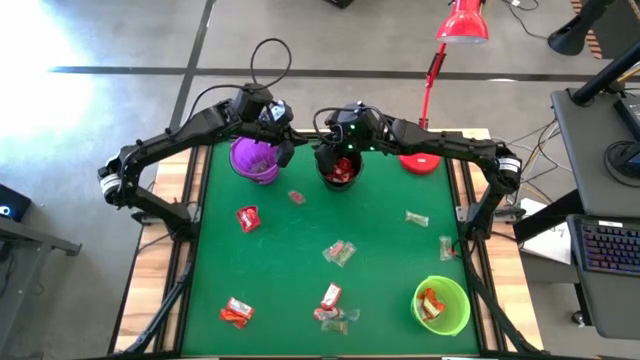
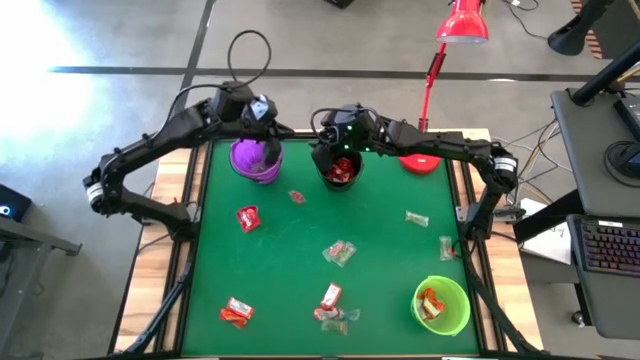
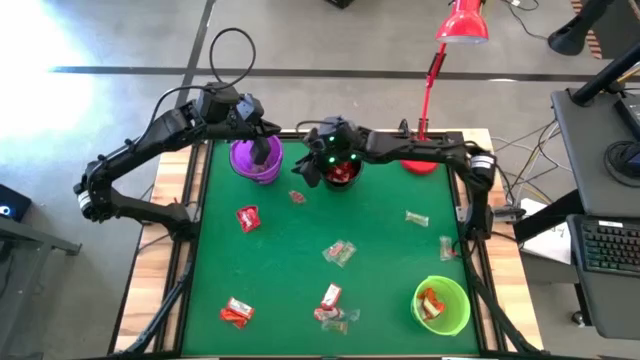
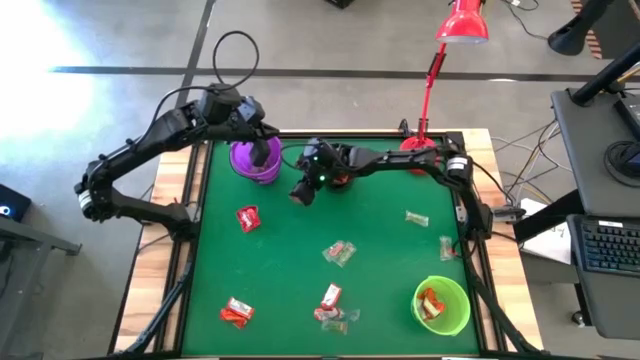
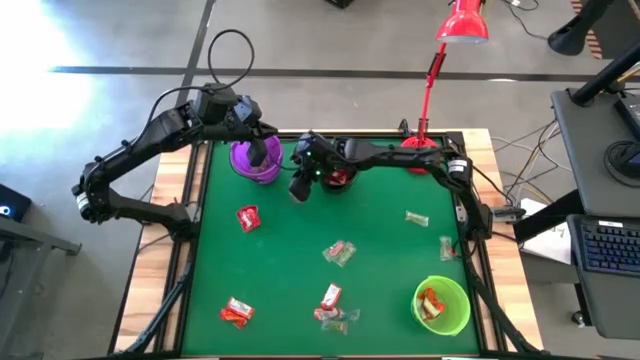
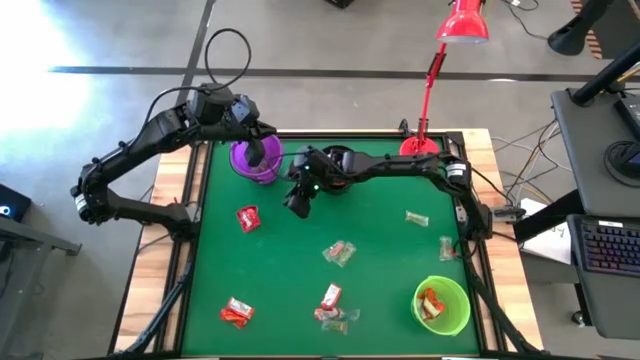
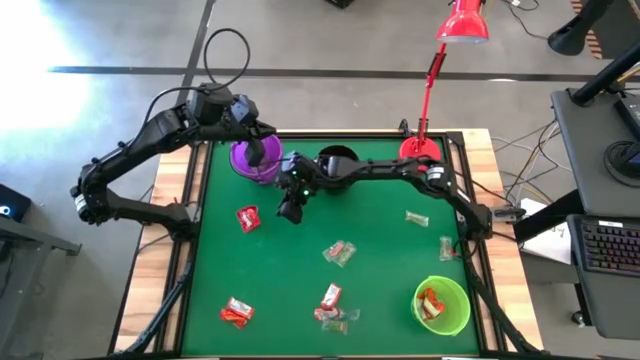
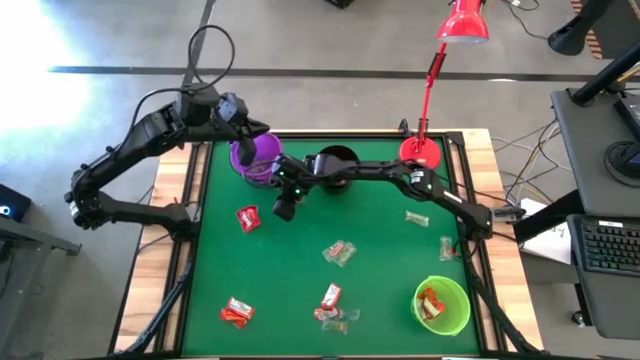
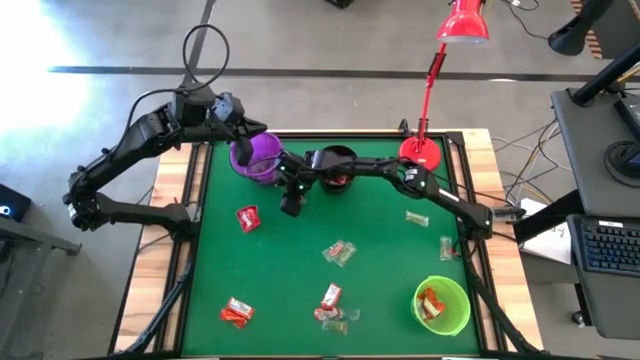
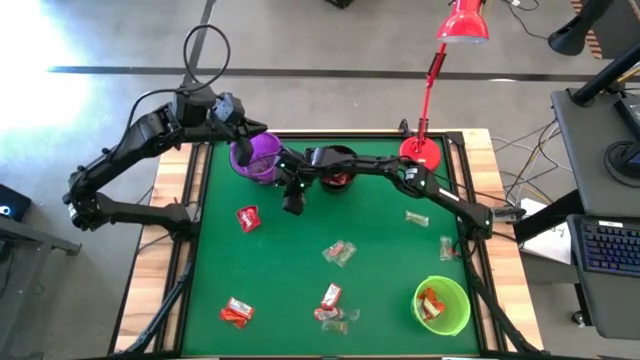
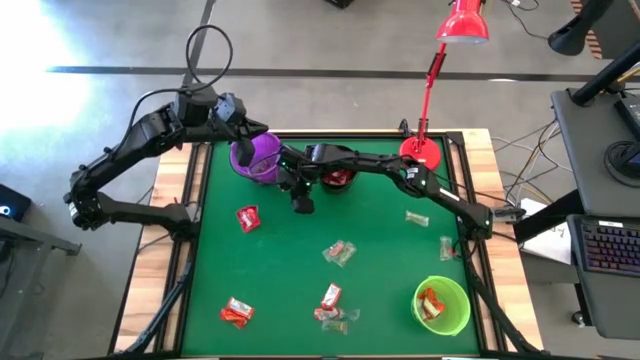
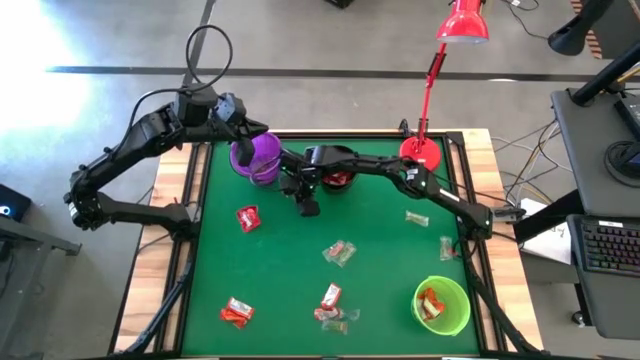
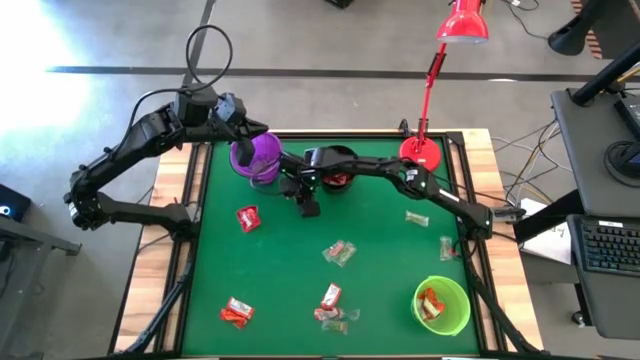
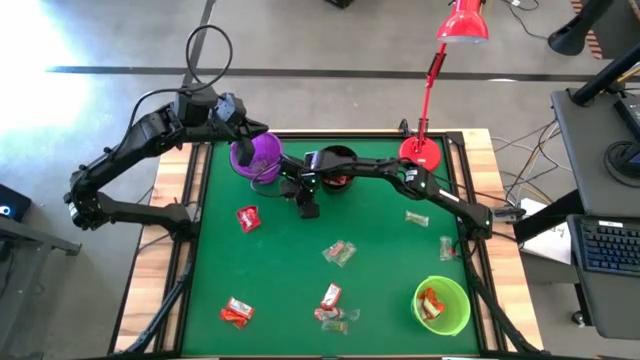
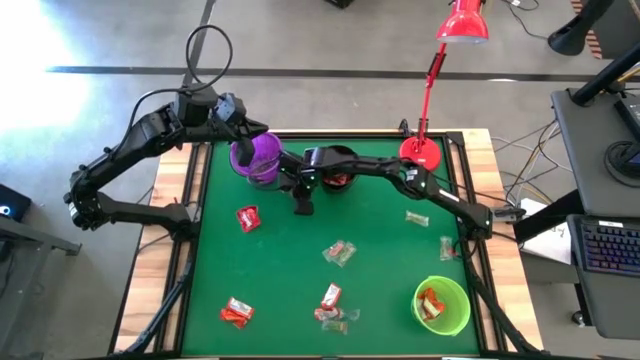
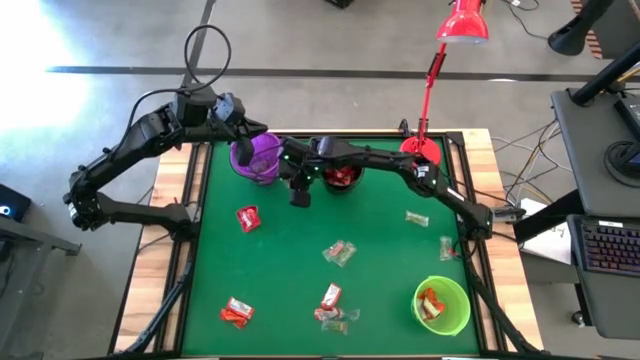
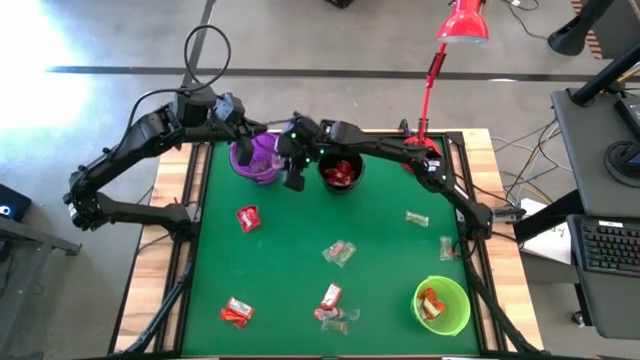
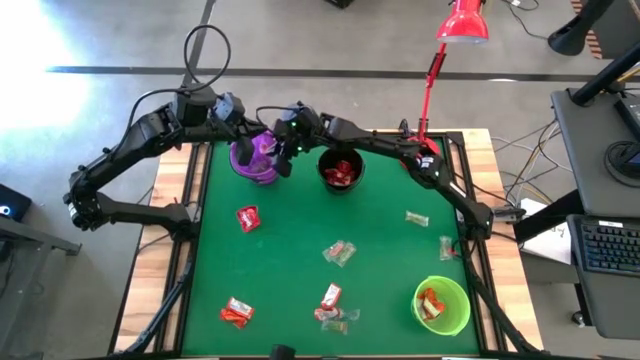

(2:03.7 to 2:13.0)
Task: Sort candy
Put the red gummy into the violet bucket

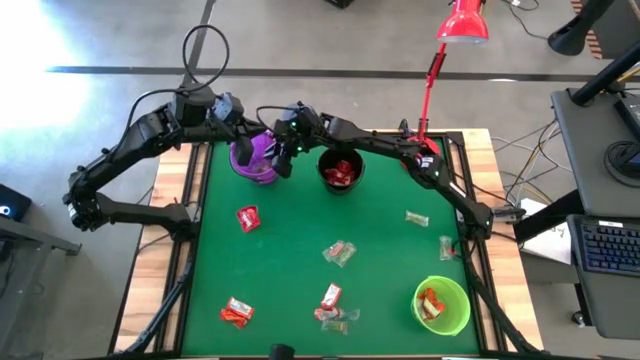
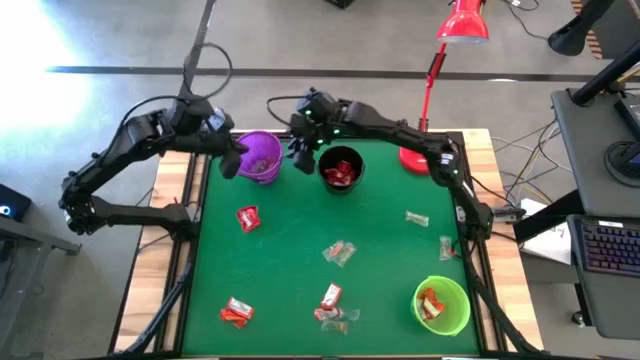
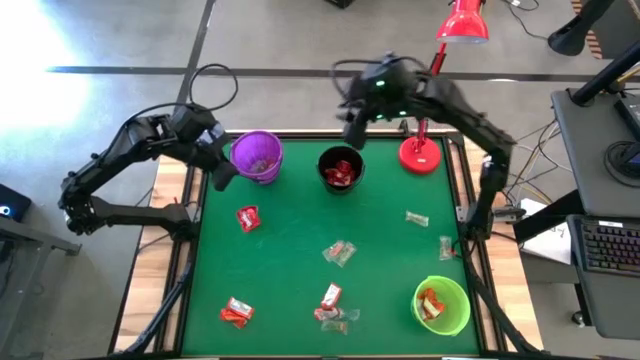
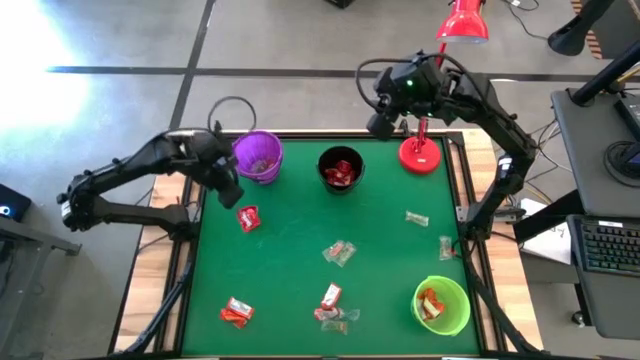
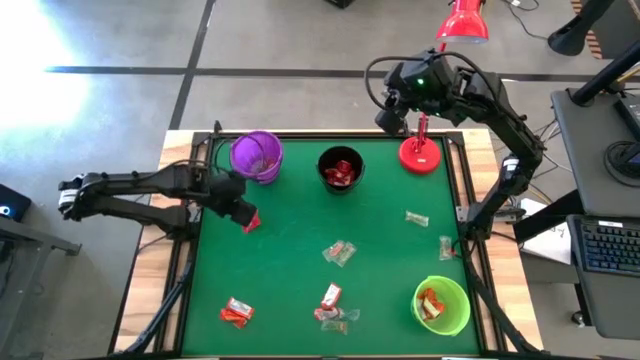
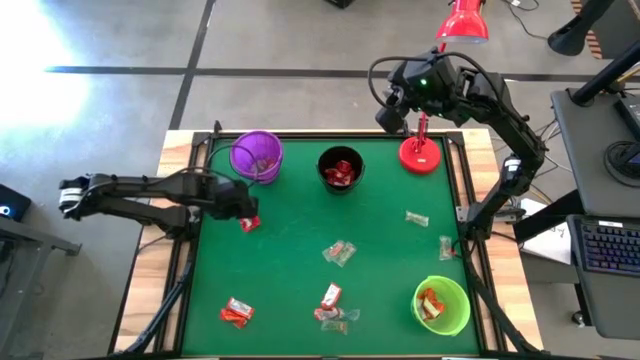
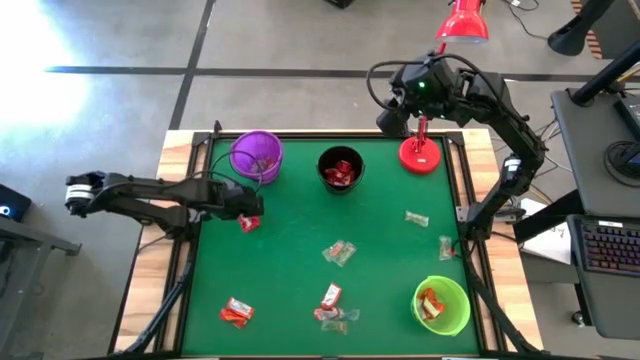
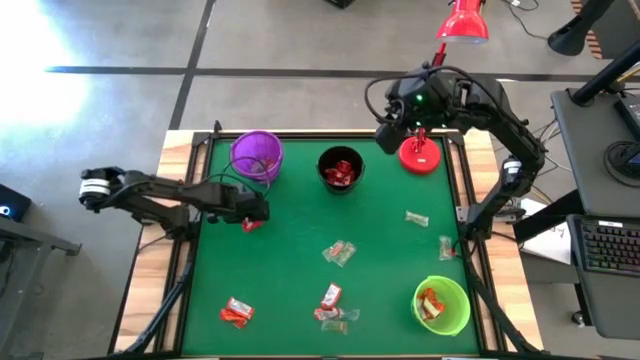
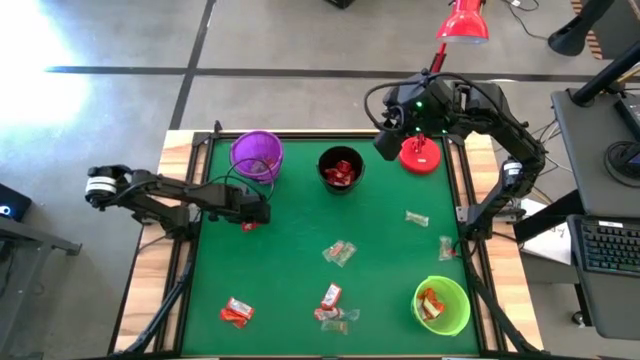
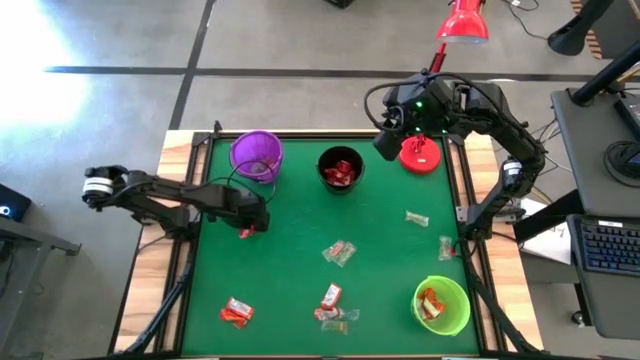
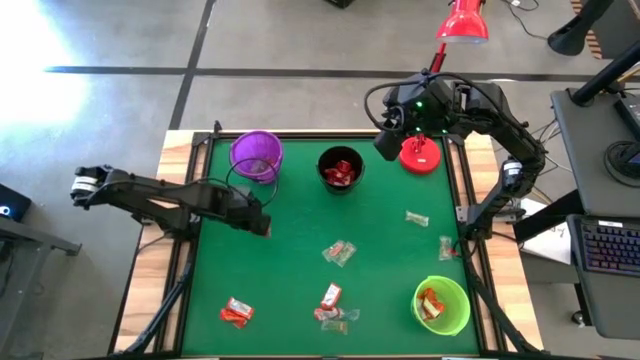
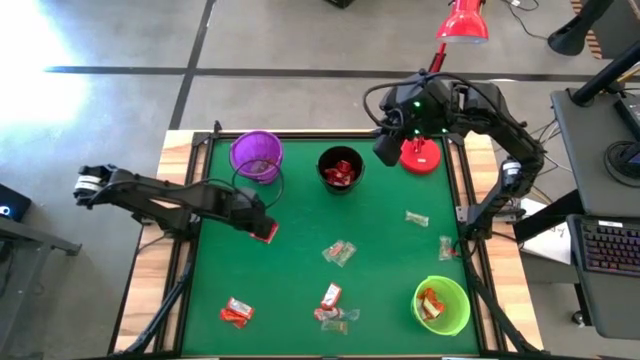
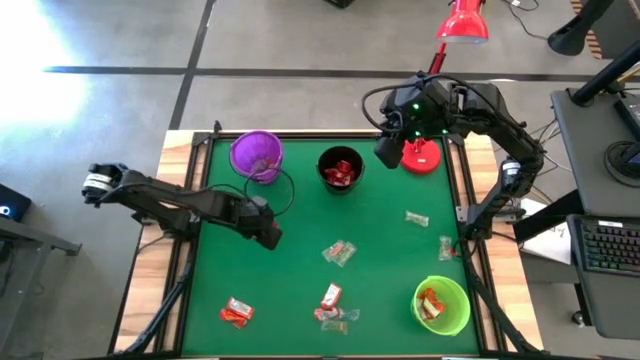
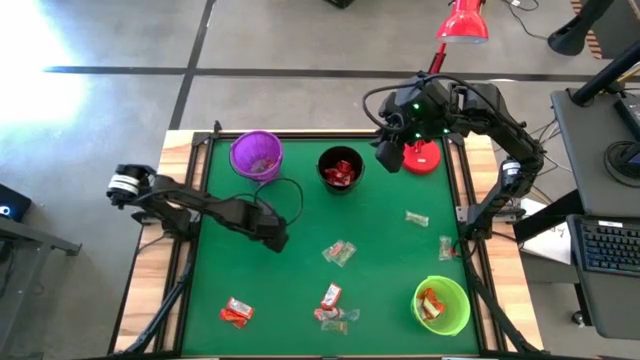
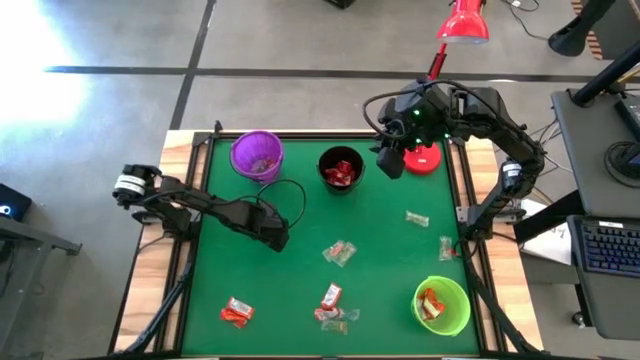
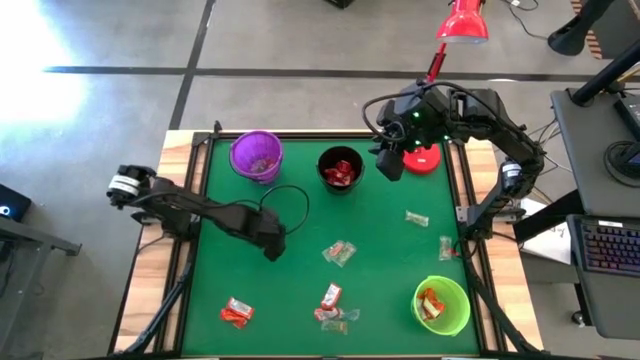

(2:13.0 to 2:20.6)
Put the red candy pack into the black bucket

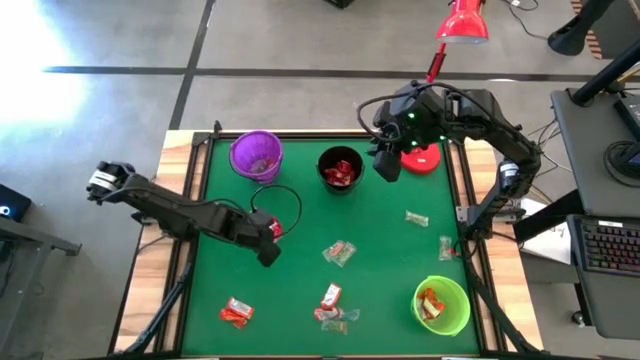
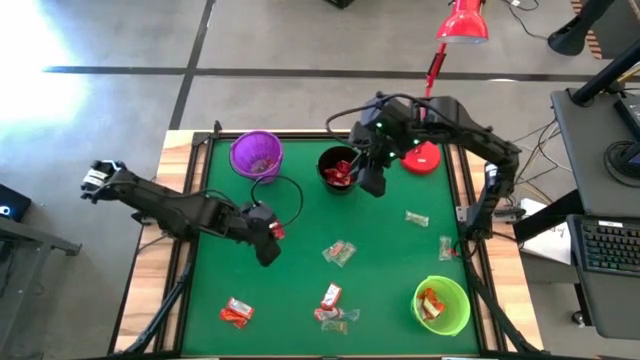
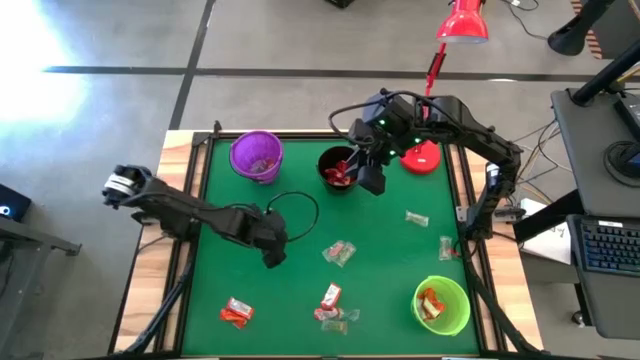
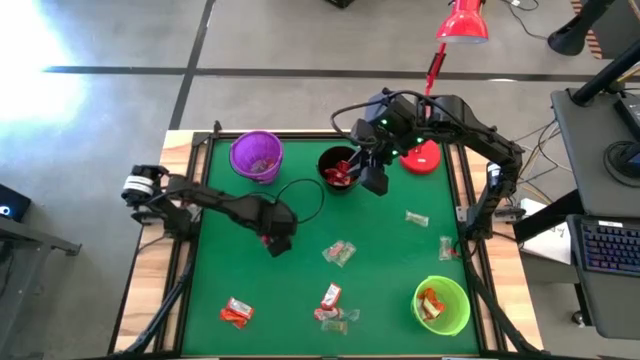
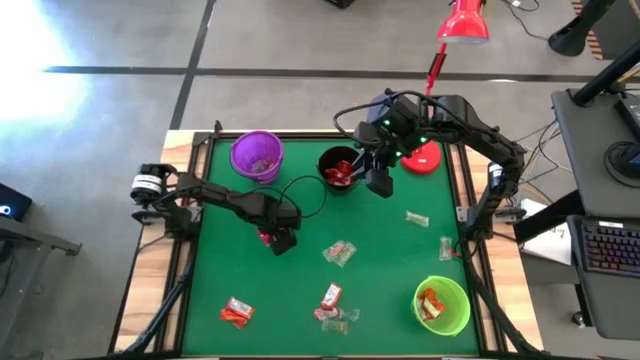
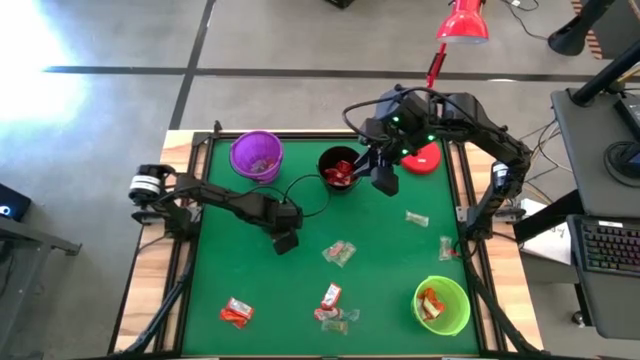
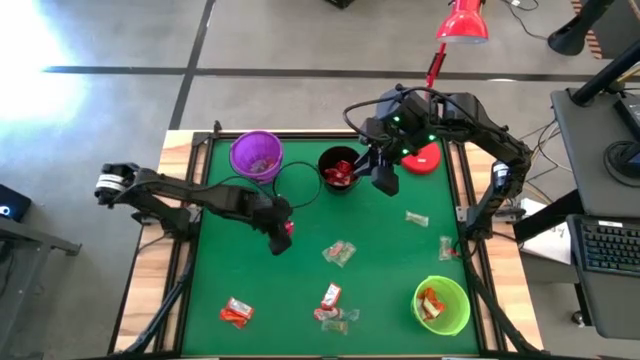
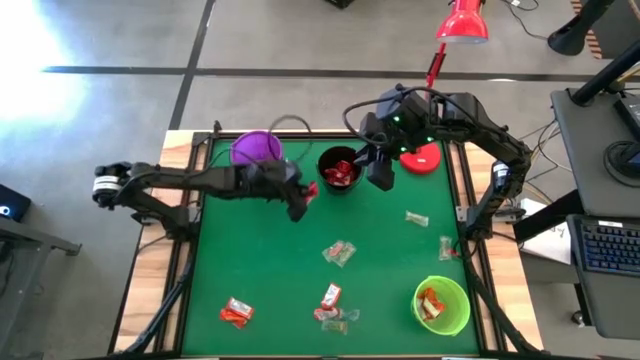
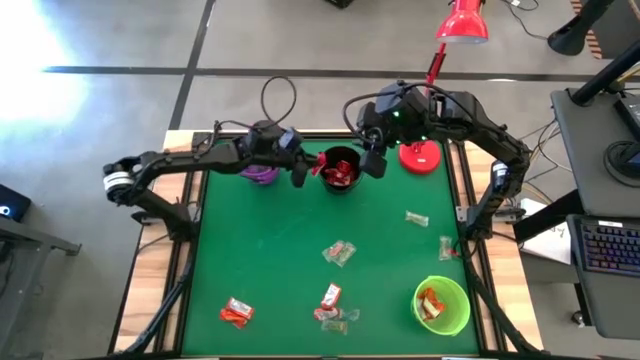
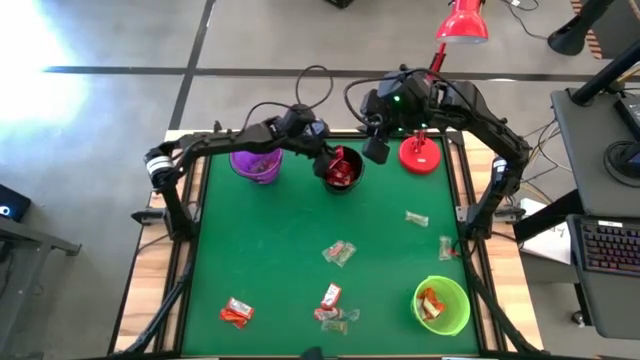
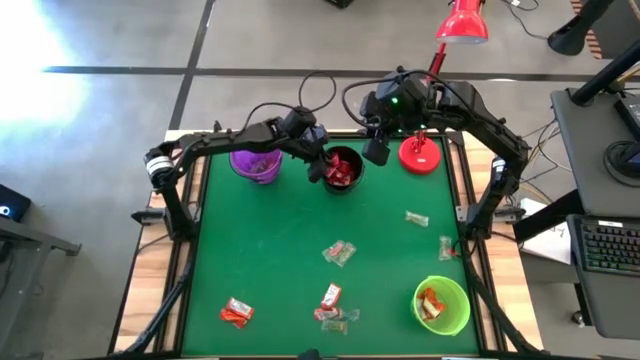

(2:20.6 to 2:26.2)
Put the red candy pack into the black bucket
